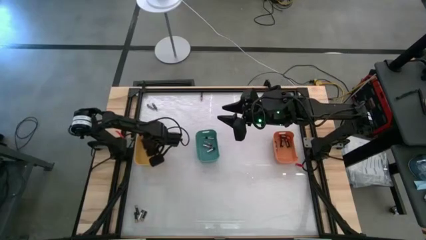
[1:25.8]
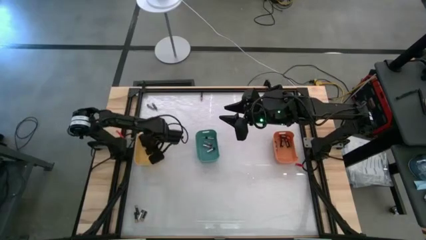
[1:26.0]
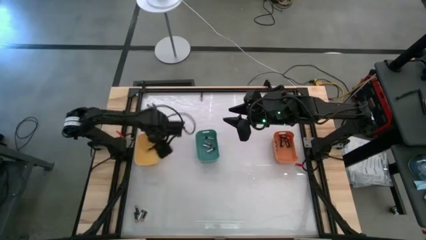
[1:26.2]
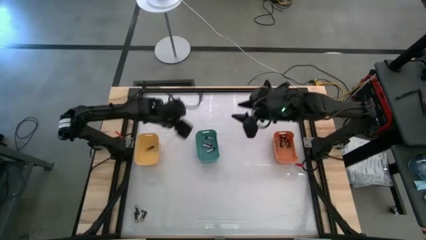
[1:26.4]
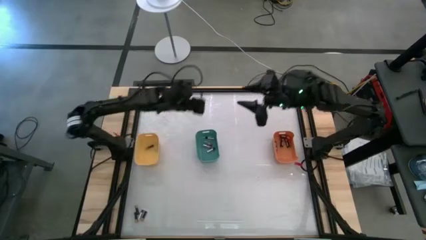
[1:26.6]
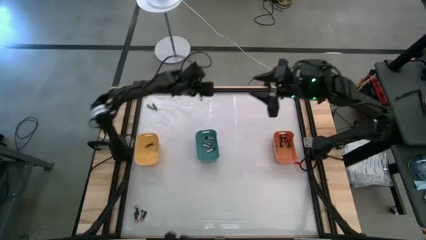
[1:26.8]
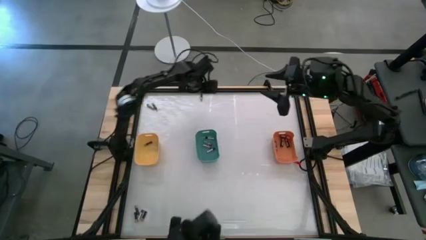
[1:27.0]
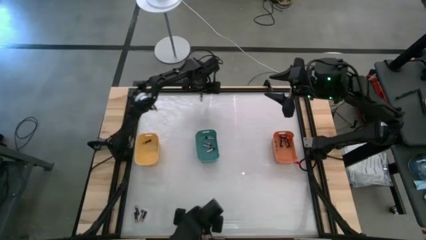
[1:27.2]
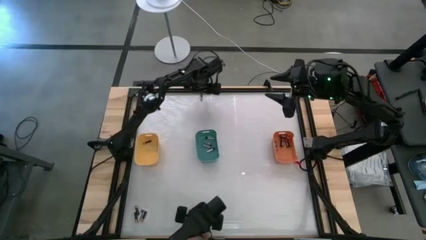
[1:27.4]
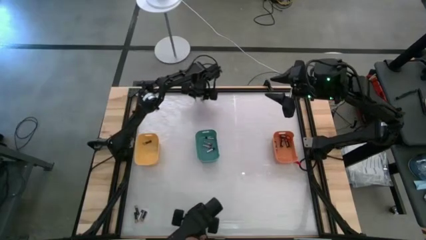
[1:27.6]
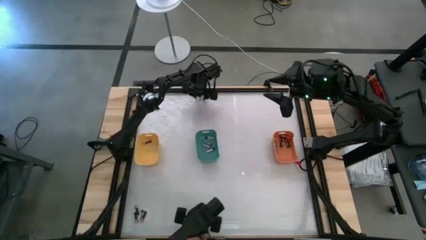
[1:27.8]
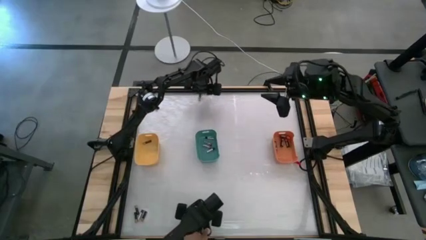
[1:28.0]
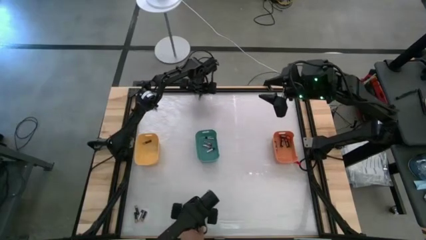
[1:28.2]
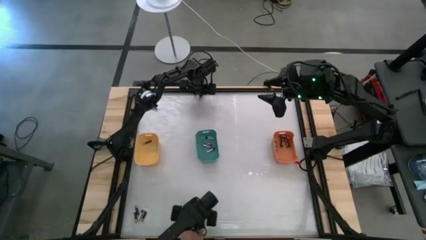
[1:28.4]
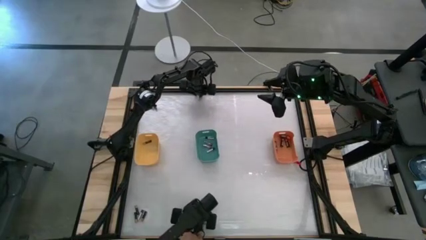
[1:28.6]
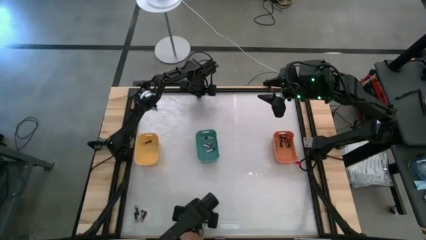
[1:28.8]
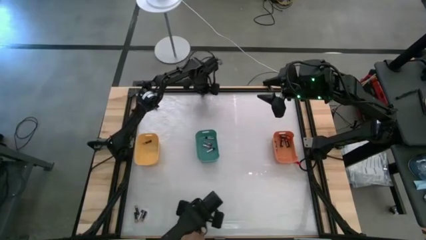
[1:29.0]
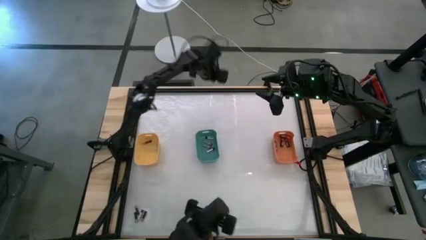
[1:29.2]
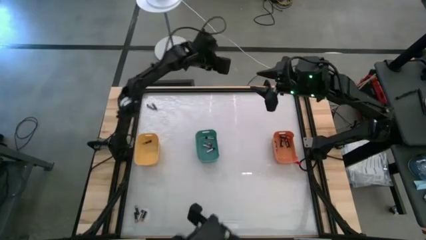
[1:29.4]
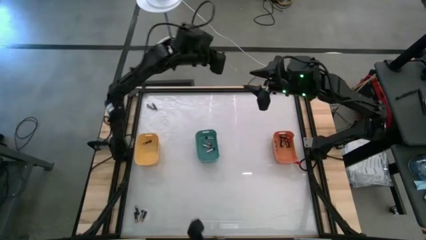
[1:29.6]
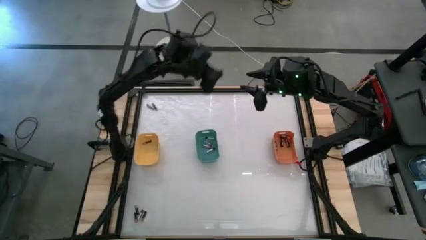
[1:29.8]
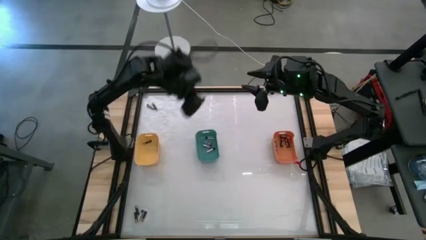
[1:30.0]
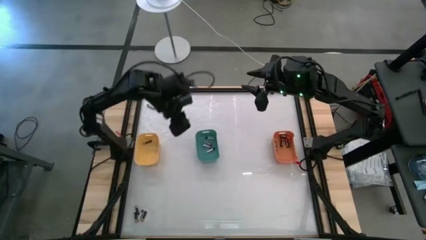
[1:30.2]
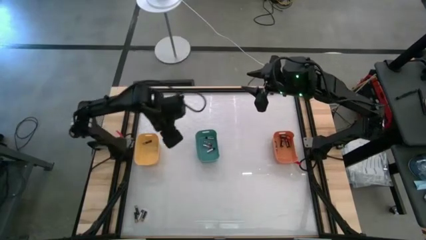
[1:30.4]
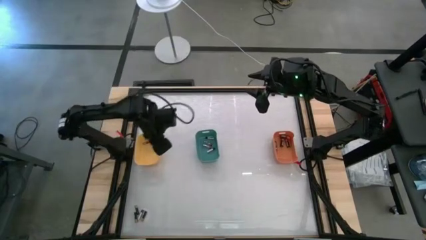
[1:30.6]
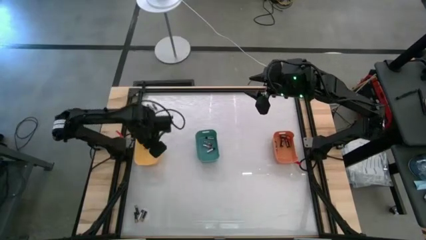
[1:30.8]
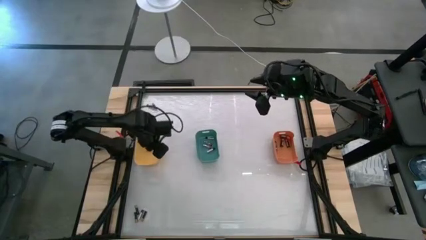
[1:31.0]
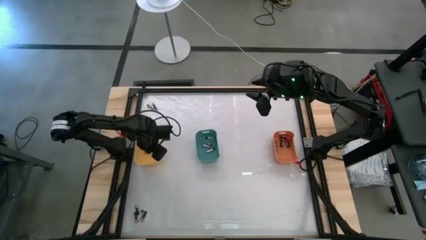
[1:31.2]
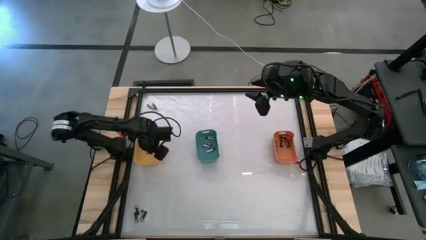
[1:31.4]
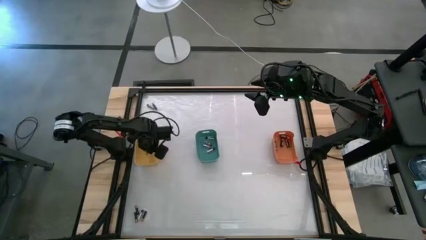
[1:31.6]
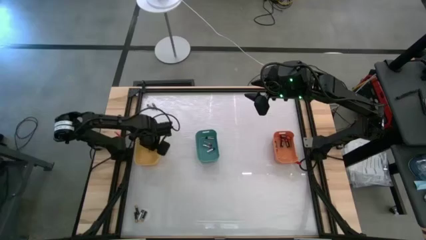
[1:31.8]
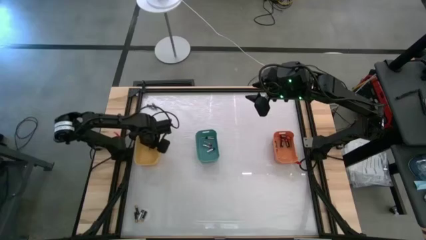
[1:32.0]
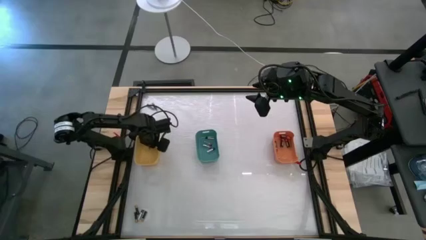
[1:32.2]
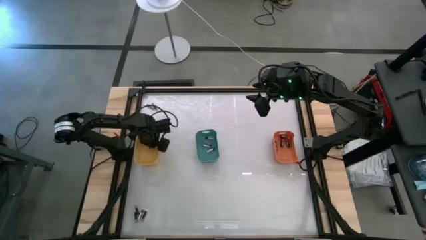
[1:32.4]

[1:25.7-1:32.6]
Task: Sort batteries
Put the black battery into the yellow bin

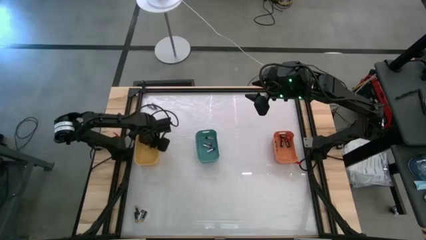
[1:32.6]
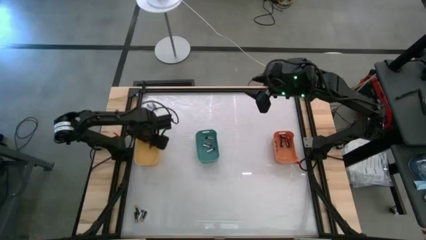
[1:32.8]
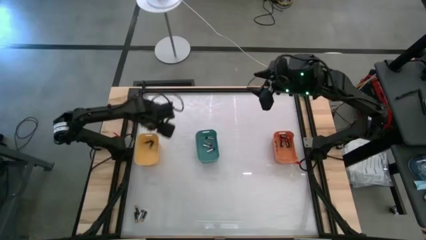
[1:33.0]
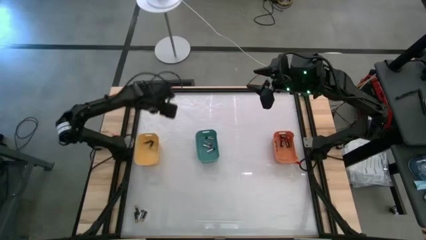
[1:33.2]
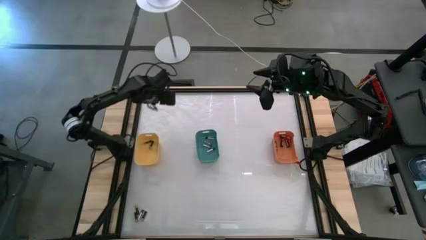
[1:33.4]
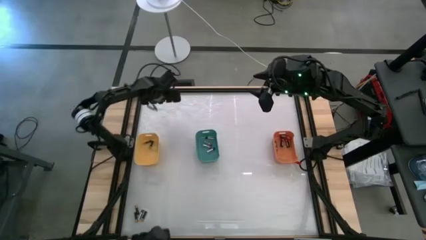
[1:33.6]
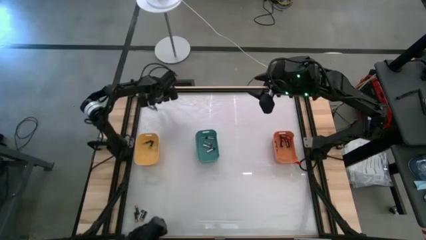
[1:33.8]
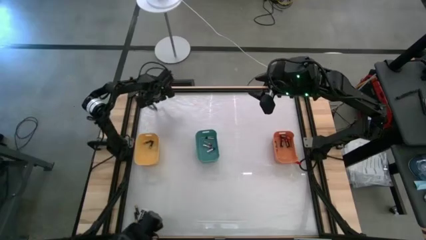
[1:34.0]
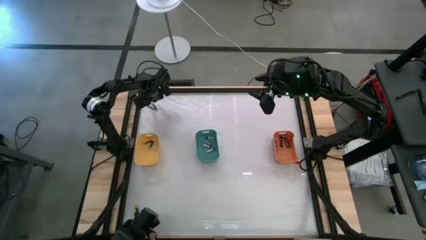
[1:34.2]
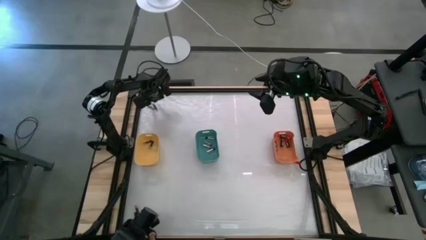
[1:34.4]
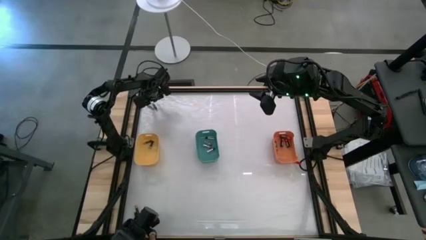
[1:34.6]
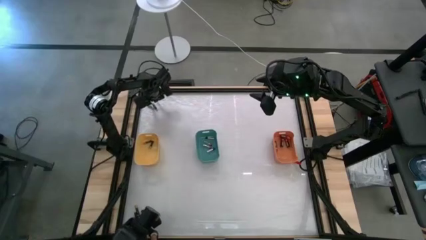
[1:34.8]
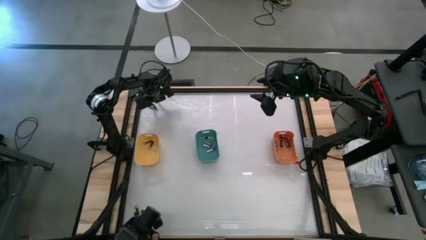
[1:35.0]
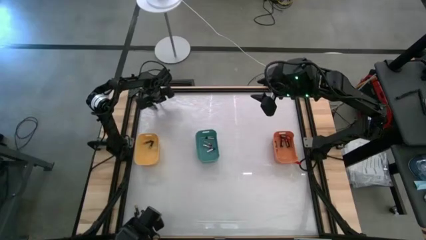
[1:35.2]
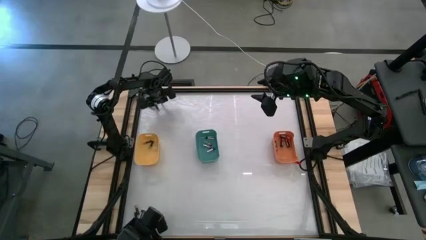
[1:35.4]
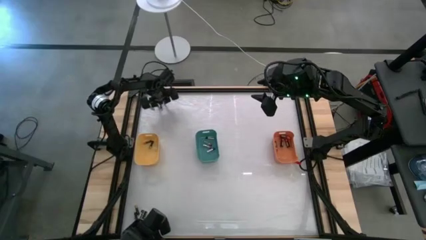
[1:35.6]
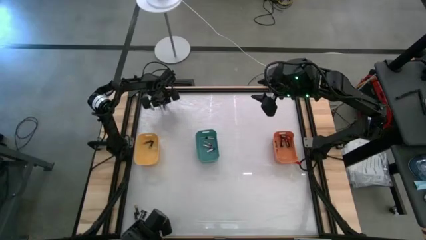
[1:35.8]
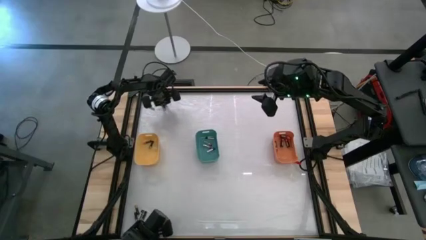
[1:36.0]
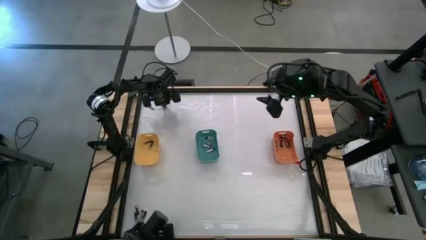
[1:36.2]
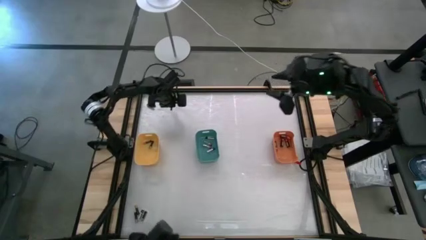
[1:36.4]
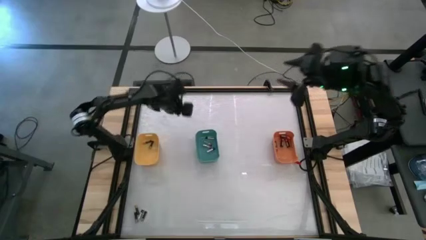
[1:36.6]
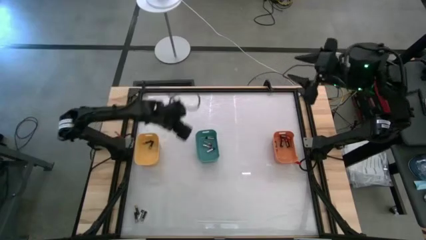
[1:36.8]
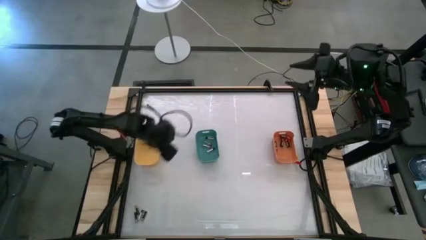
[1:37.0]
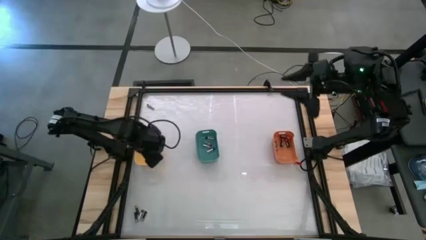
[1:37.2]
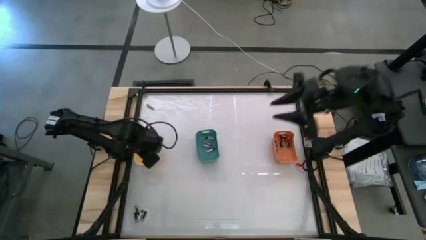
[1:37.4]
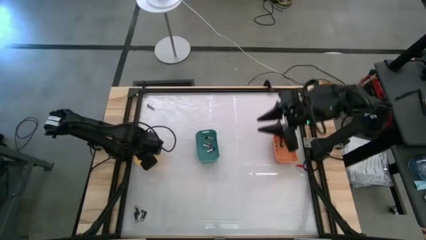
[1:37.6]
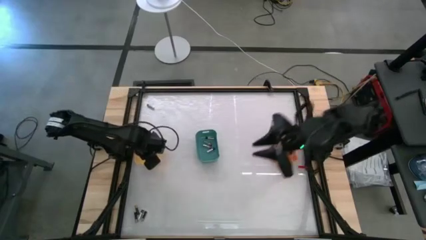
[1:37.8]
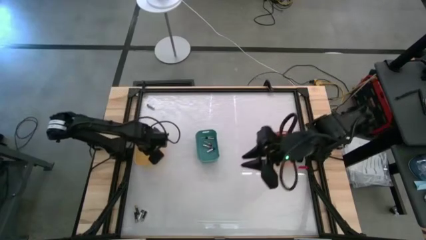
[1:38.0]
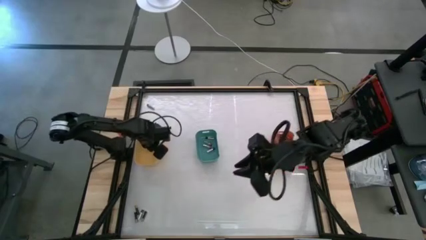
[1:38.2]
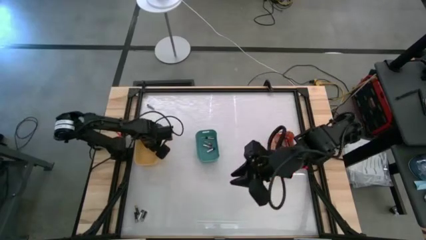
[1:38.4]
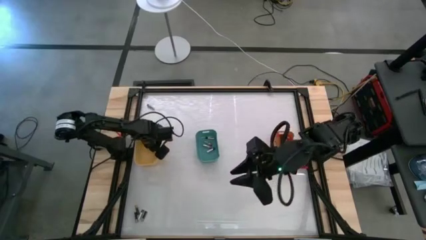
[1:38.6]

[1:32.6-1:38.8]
Put the black battery into the yellow bin

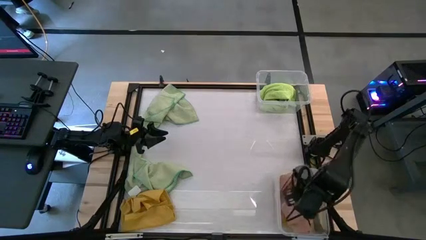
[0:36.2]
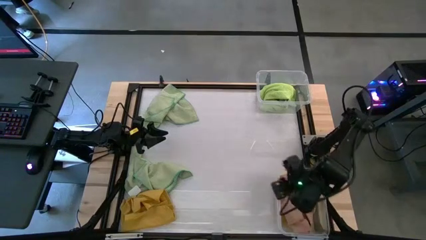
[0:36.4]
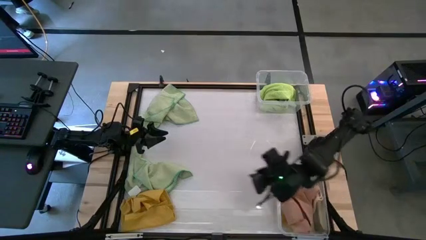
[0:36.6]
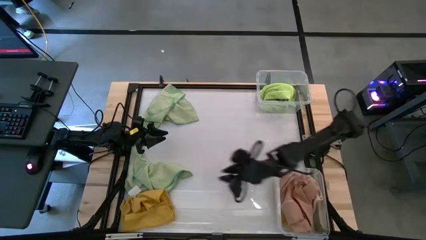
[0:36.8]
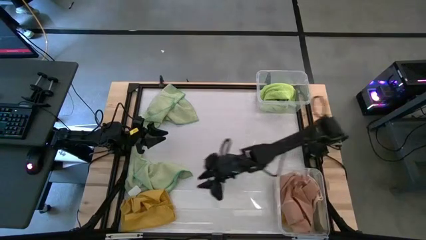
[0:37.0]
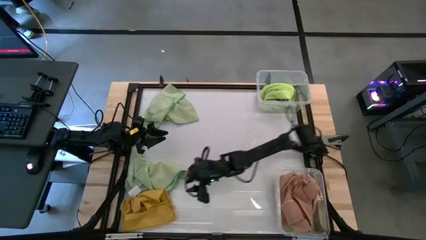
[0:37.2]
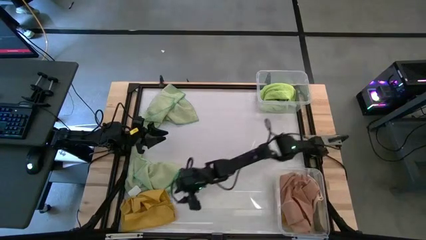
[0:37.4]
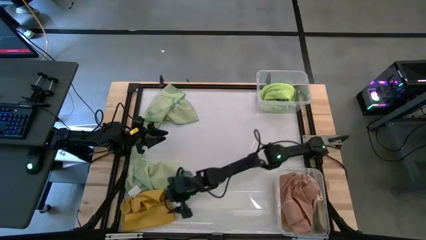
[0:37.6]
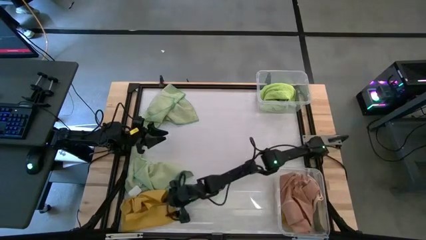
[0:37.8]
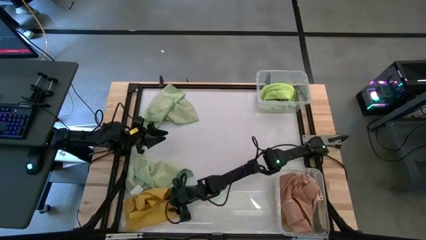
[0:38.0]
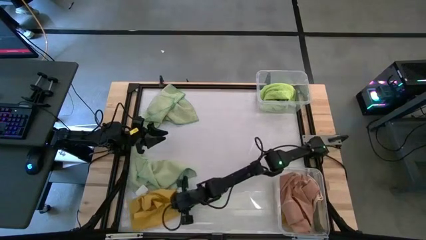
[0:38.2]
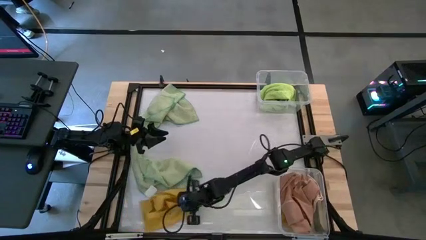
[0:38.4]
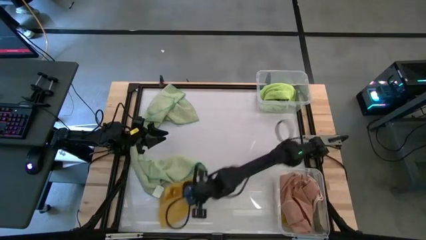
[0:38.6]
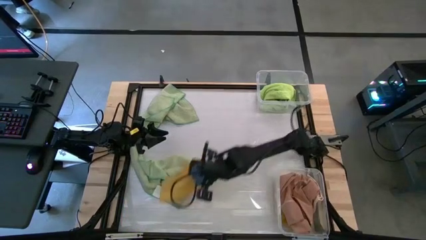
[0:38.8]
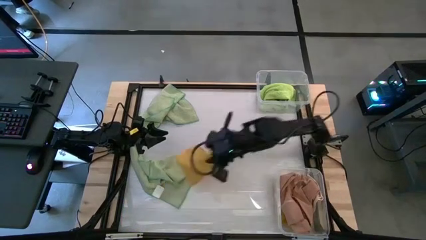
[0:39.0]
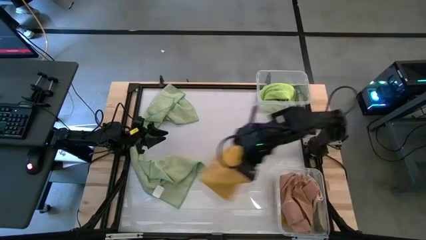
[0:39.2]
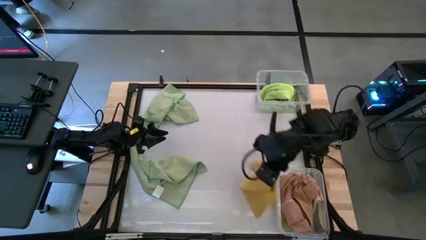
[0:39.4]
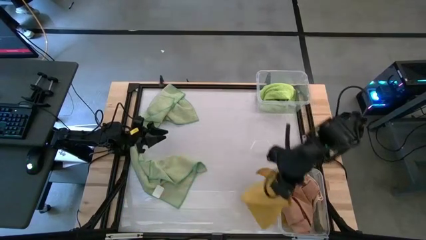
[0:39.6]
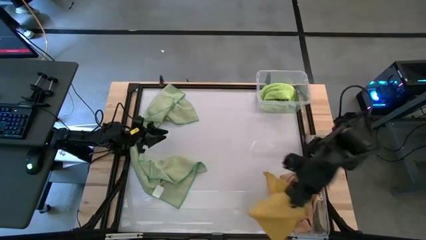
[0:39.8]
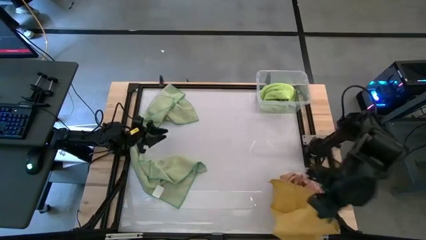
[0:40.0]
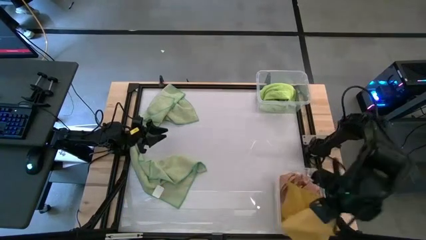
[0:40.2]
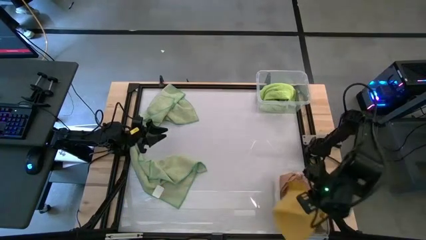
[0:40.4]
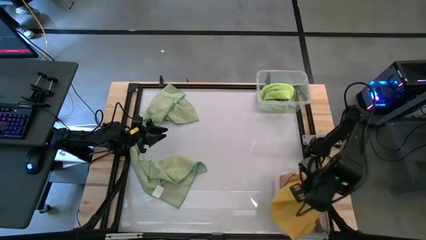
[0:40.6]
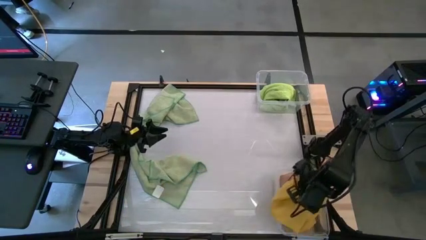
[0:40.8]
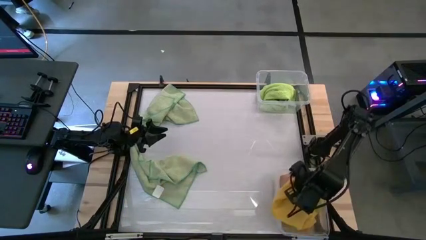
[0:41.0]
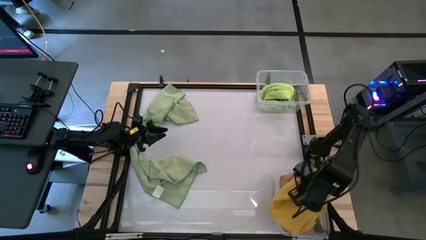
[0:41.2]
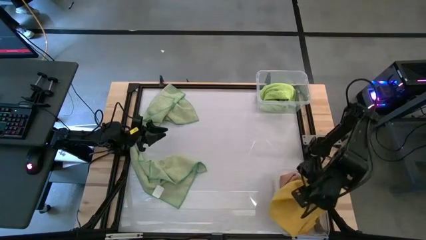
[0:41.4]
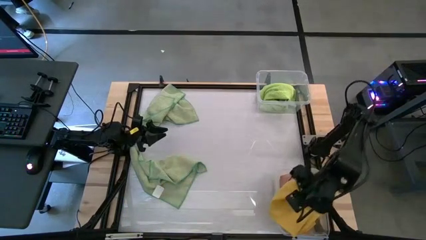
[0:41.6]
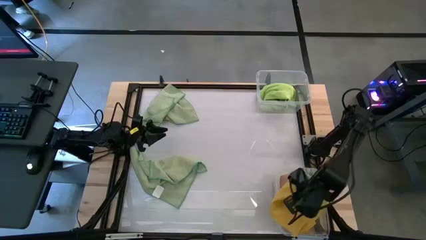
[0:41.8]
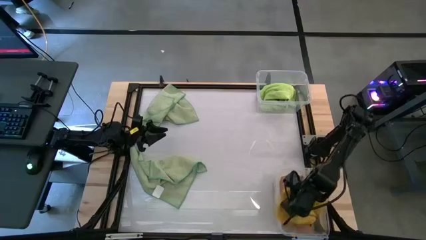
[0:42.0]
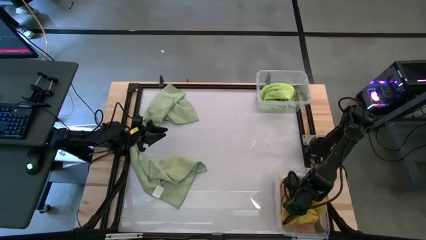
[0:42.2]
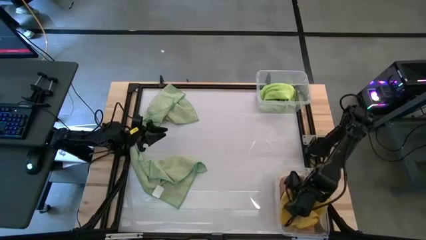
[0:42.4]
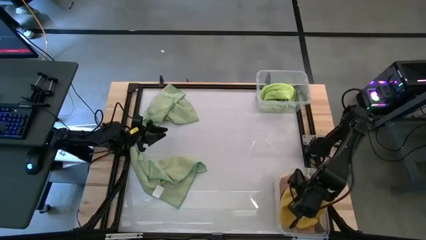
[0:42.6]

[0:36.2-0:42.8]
Task: Sort towels by color in basket
Put the bottom left yellow towel into the bottom transparent bin
